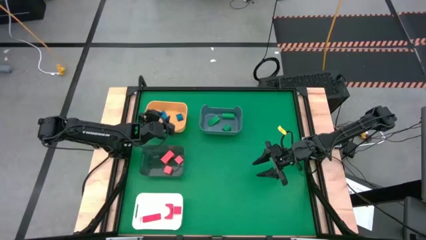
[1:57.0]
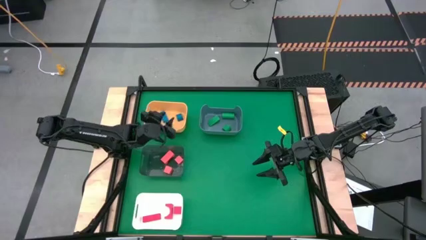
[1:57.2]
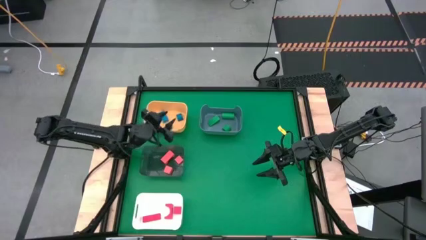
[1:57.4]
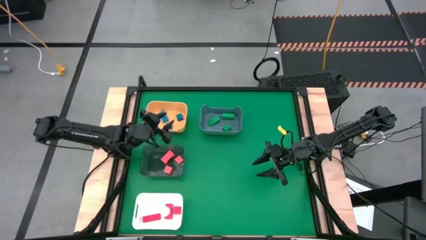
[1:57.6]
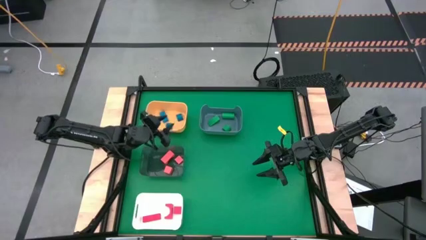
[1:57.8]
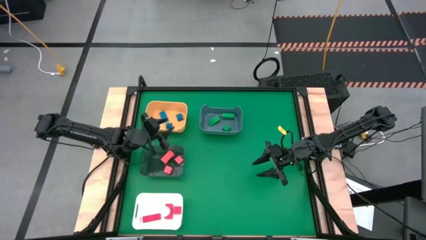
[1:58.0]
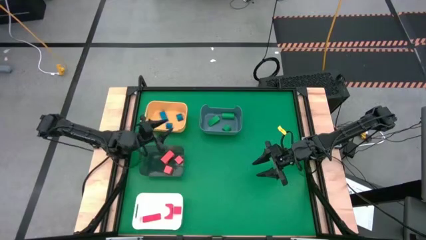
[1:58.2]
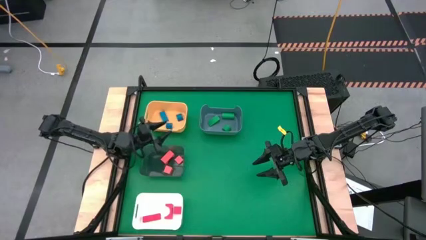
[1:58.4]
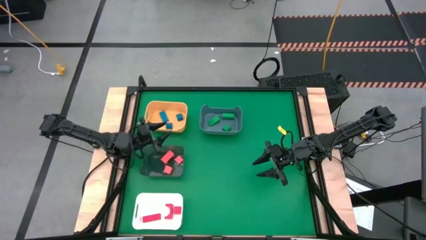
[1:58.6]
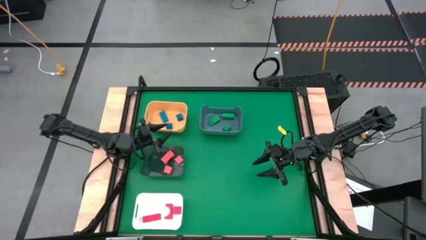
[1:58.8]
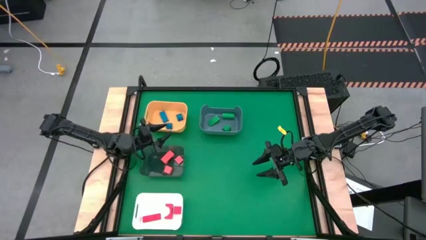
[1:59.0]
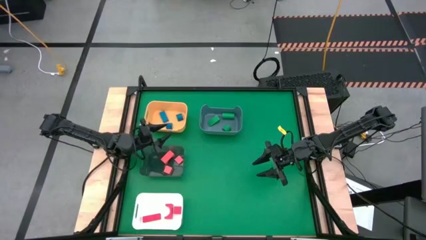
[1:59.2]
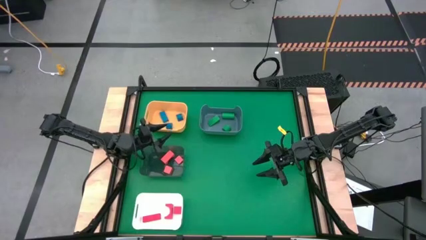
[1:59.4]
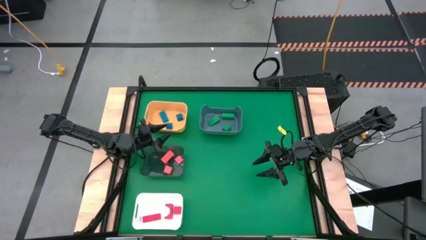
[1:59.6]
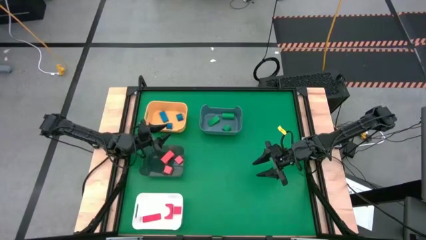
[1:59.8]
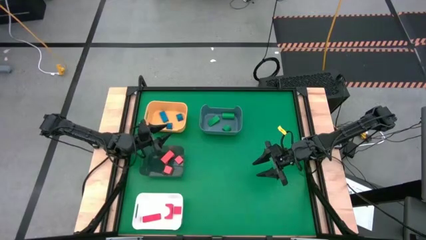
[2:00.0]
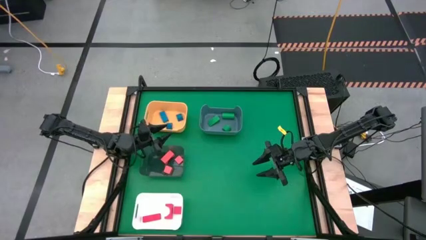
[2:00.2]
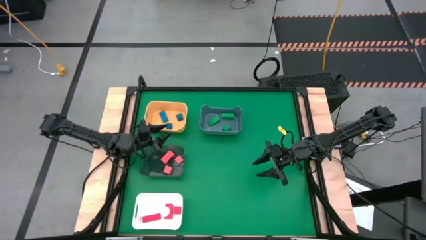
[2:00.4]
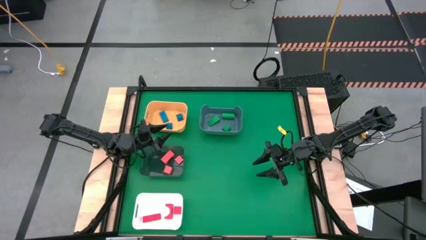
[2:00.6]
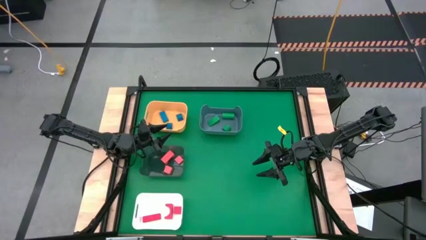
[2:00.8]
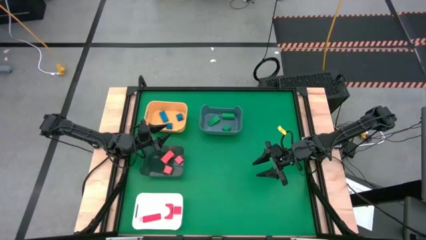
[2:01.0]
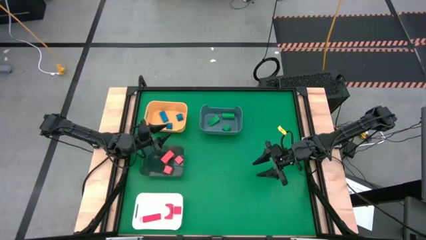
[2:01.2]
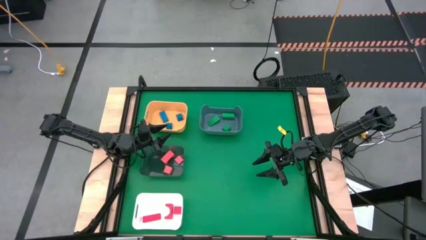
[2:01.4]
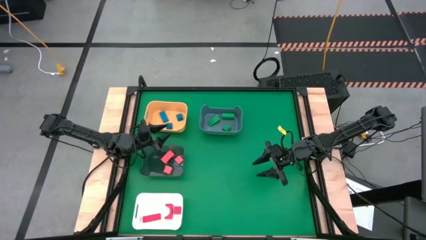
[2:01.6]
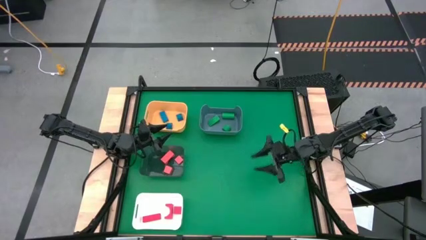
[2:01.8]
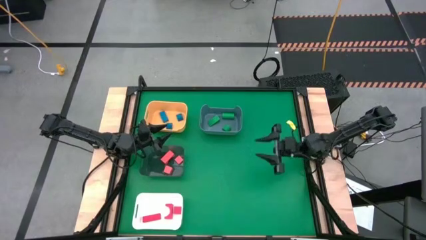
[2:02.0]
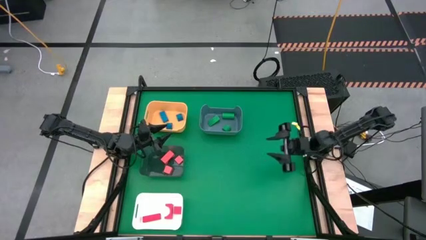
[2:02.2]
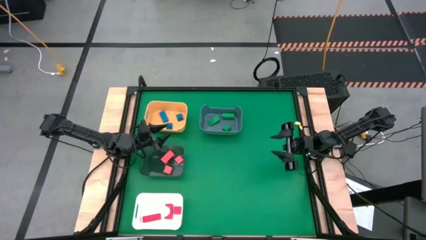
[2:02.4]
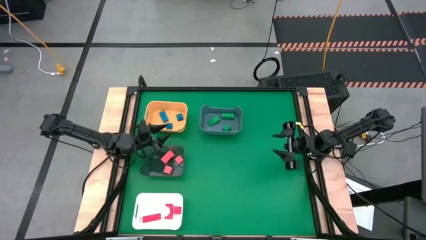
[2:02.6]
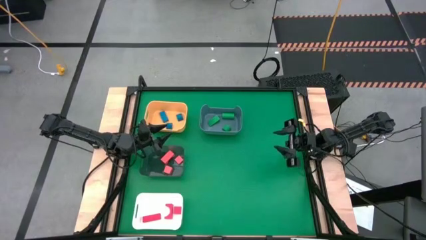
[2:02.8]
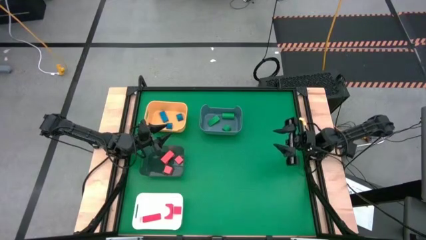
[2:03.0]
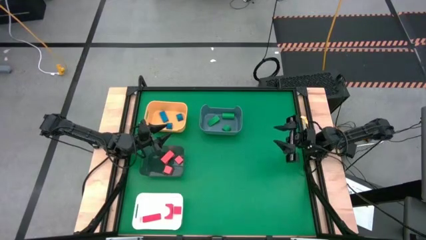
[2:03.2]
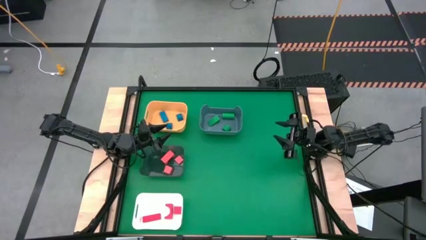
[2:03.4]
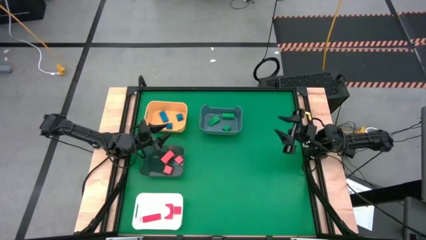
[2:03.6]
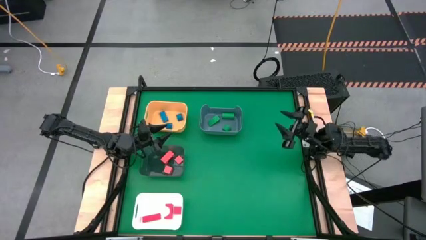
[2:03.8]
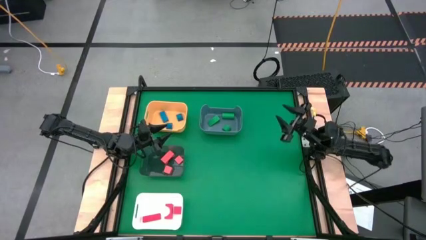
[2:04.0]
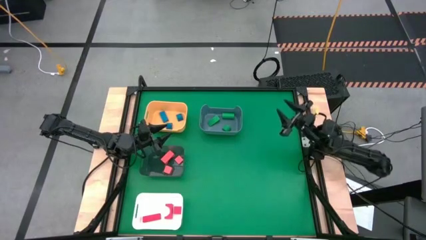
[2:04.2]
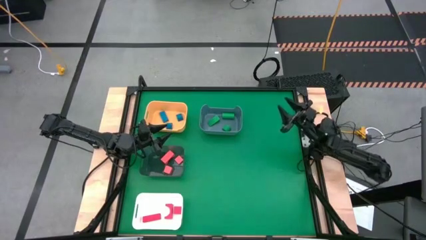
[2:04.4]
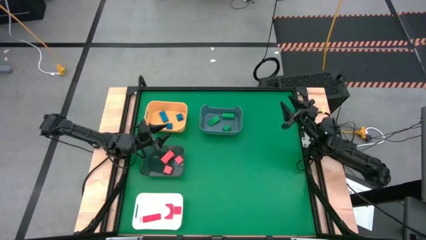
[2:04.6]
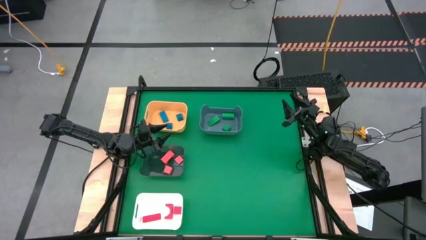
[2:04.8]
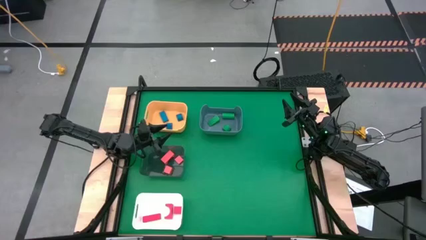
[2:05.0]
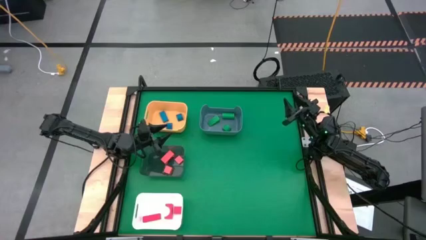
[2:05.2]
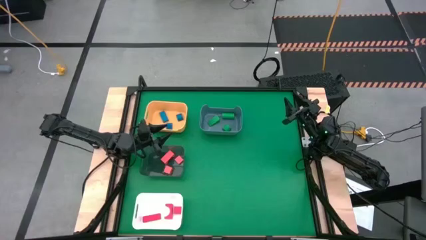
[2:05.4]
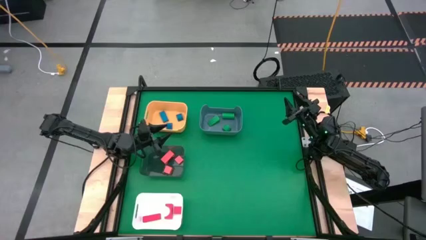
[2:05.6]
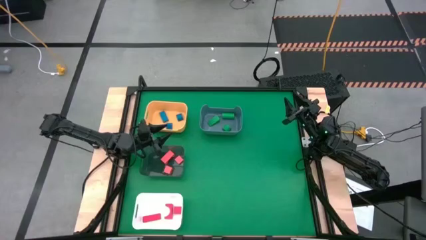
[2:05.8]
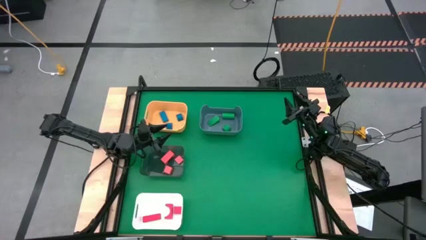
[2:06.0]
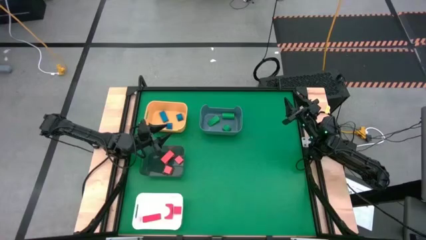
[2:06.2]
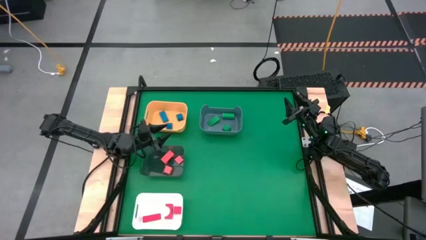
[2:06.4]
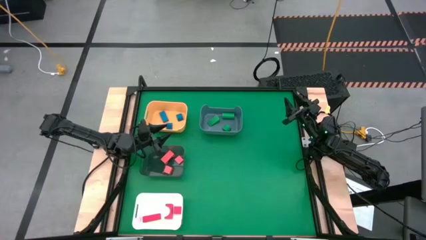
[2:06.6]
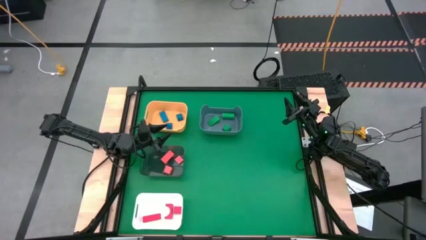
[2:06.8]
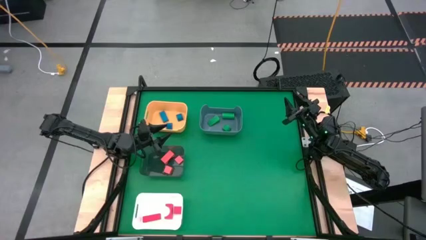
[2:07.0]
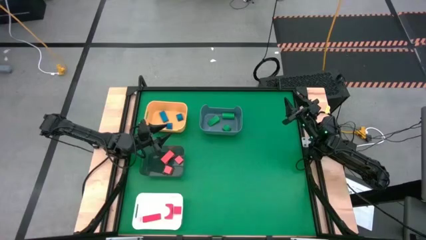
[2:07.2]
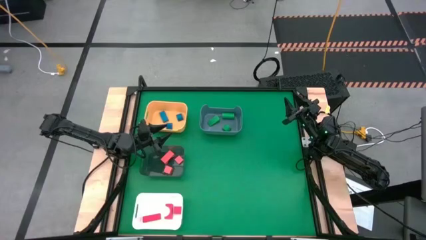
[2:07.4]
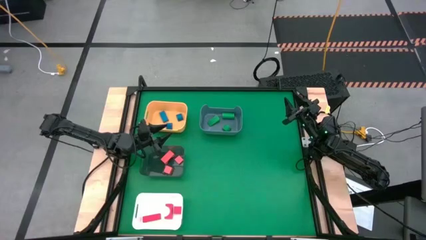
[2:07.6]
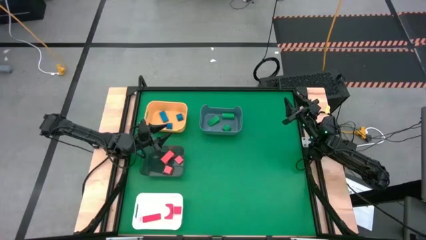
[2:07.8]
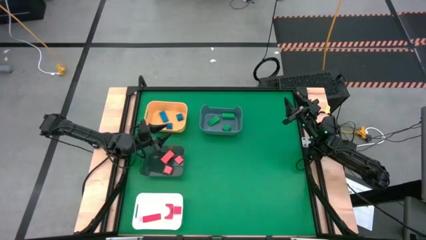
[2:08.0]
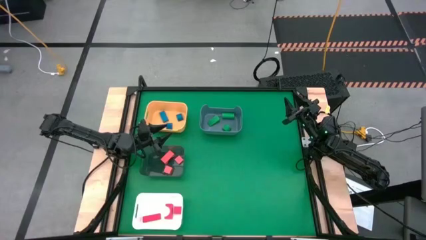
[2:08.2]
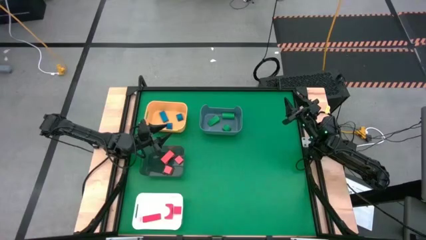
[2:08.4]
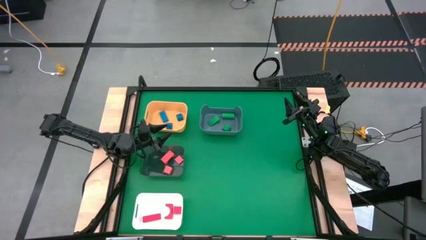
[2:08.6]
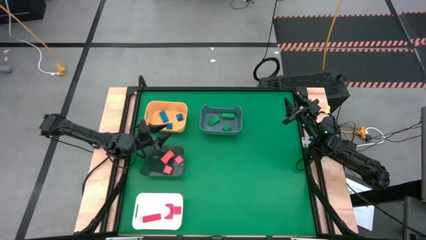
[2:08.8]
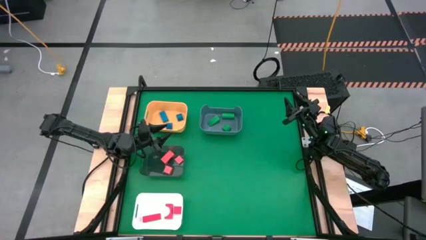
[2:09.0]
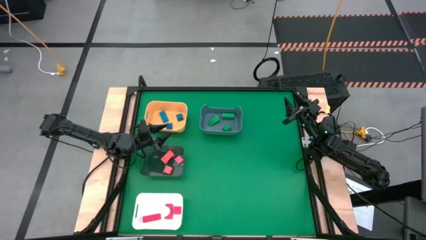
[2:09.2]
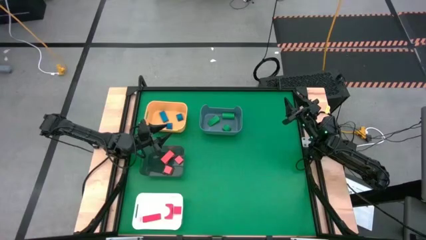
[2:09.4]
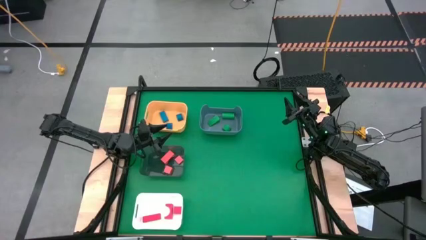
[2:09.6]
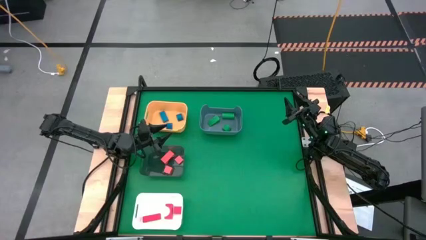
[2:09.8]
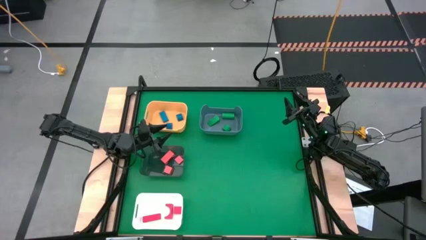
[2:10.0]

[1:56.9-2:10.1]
Task: Sort & place blocks by color
Return to Home Position

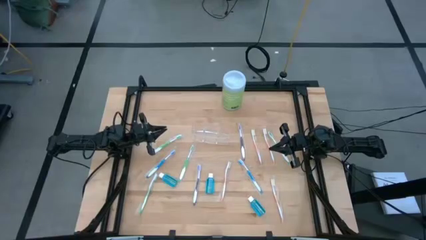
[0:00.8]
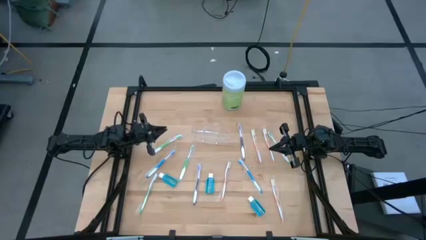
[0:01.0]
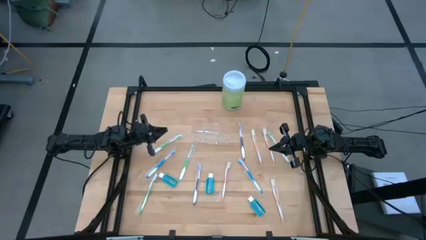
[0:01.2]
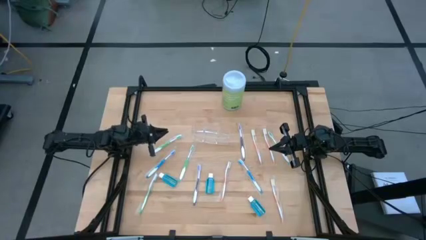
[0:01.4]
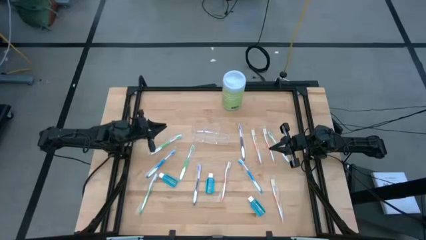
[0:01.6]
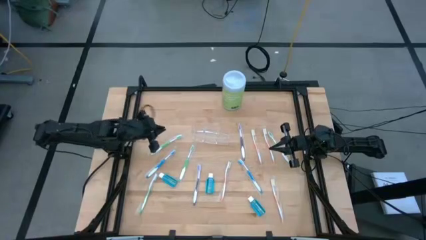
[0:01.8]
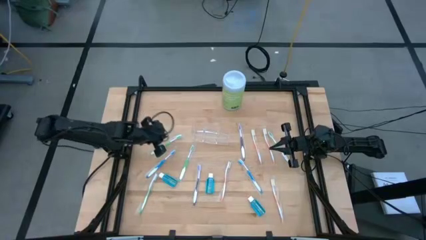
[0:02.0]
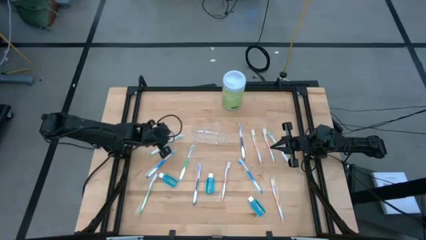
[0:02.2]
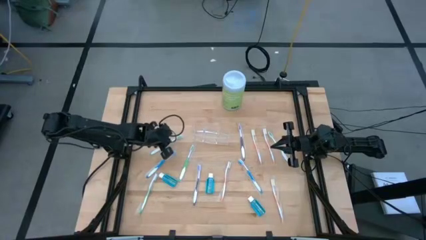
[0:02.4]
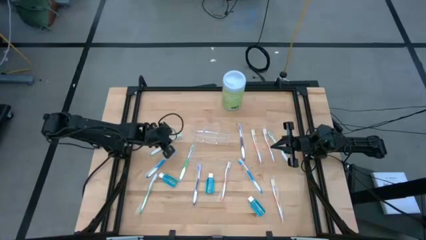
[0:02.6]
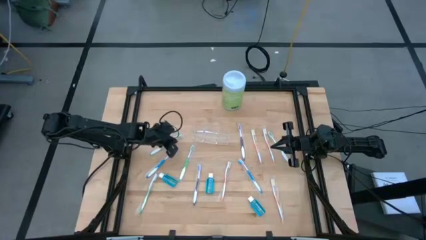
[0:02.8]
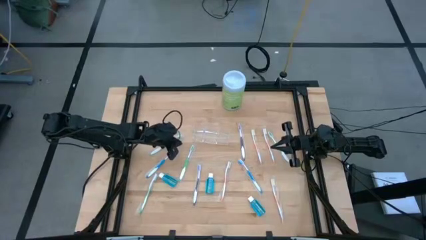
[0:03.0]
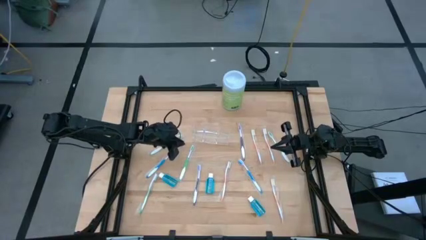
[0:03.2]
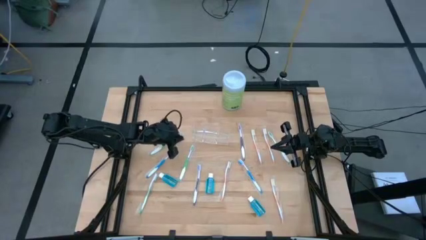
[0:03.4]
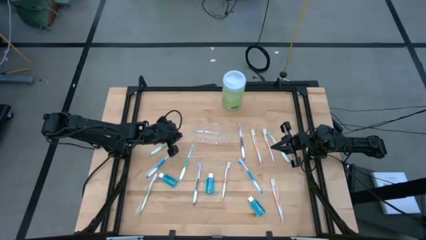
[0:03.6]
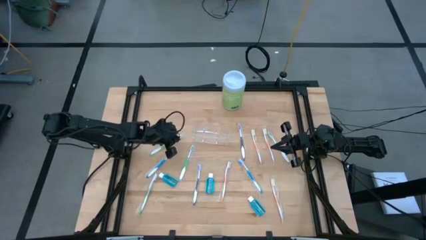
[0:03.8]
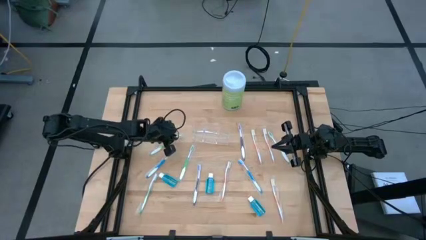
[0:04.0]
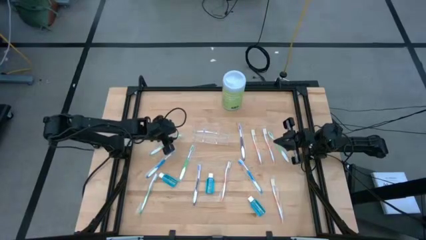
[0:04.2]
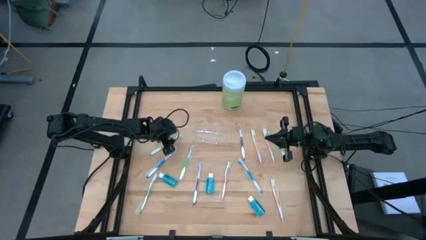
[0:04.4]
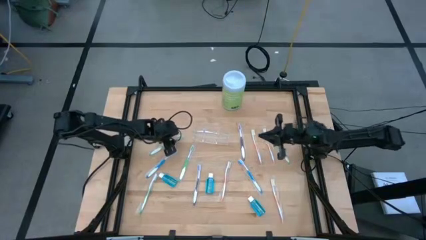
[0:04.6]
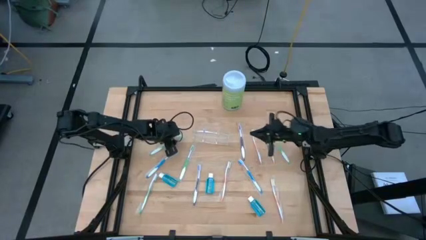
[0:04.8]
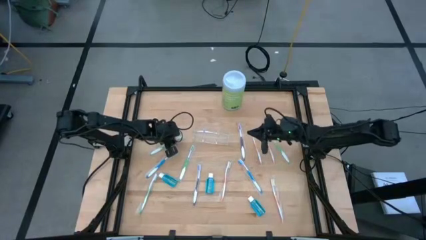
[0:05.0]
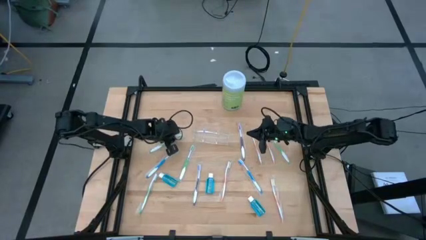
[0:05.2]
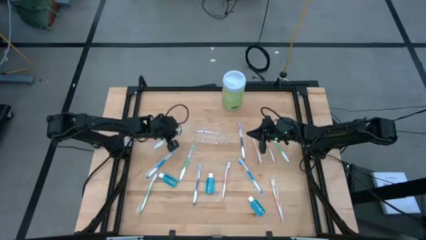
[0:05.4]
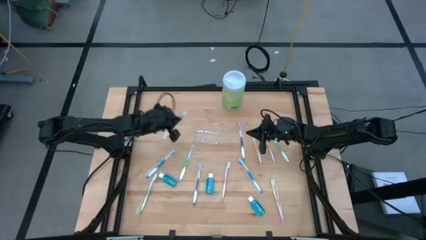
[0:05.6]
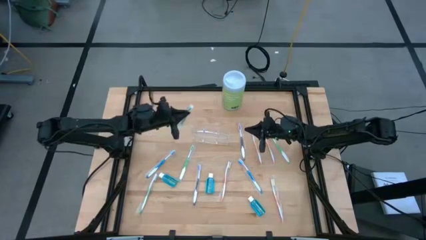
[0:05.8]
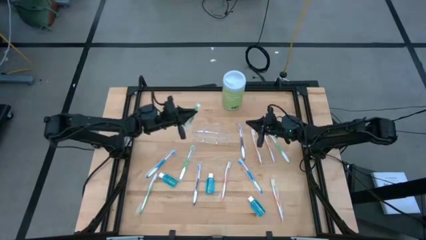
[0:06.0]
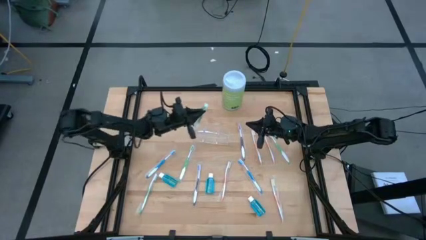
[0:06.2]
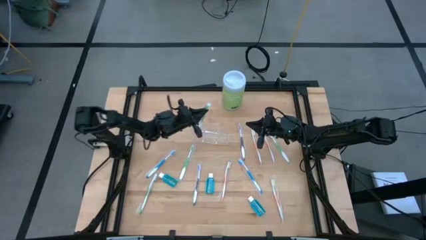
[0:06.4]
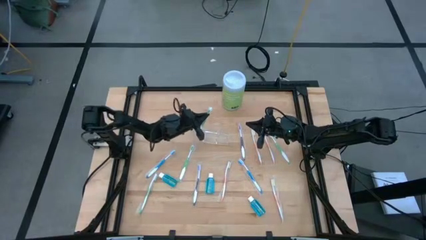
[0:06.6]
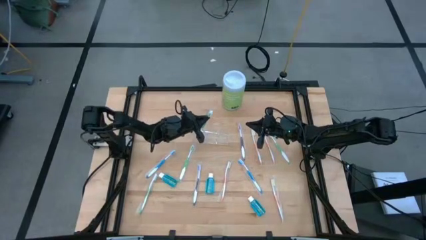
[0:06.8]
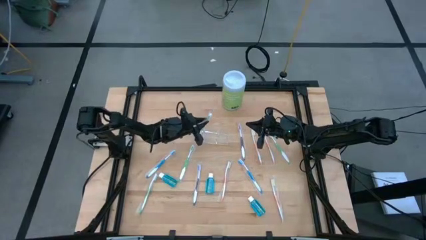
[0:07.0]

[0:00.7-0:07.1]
Task: Pick & Place toothbrushing station
Put the green toothbrush into the transparent organizer
